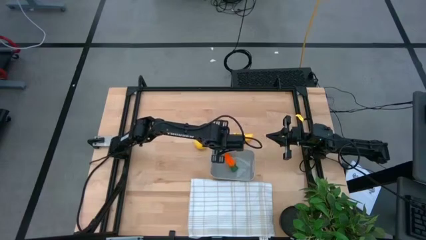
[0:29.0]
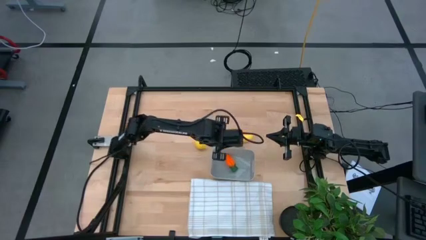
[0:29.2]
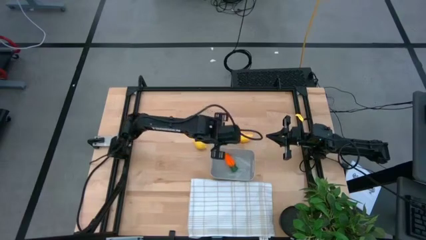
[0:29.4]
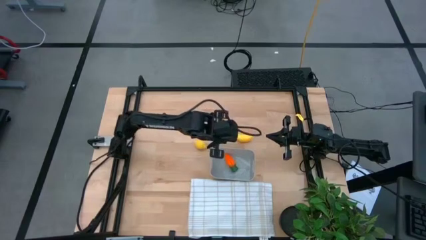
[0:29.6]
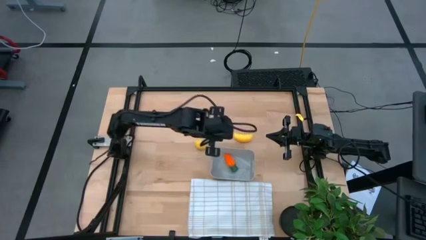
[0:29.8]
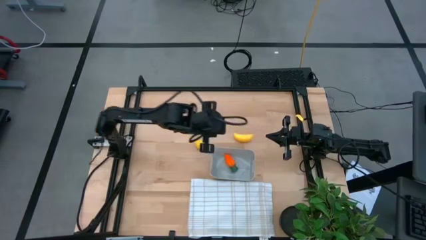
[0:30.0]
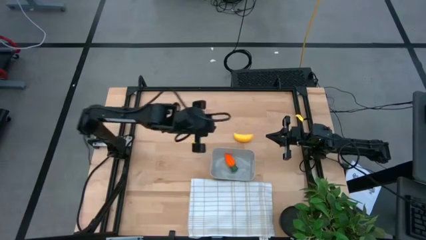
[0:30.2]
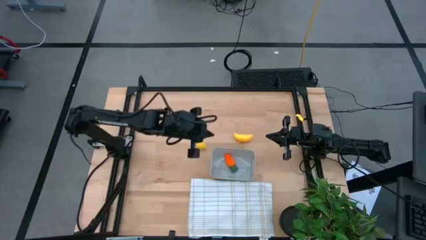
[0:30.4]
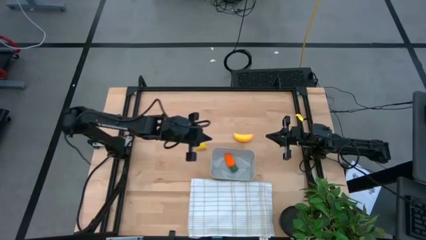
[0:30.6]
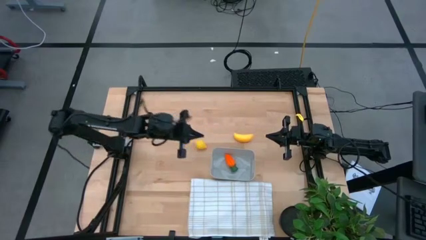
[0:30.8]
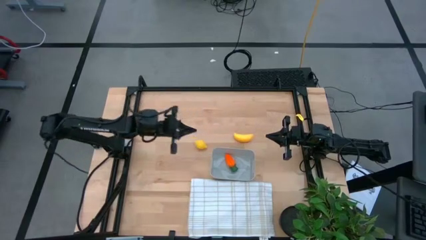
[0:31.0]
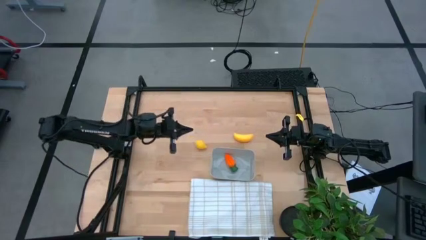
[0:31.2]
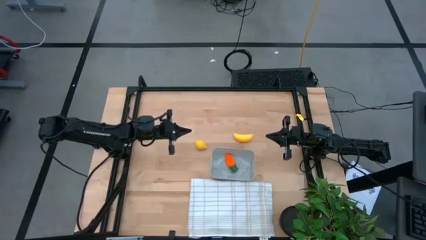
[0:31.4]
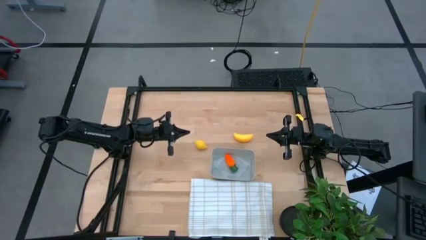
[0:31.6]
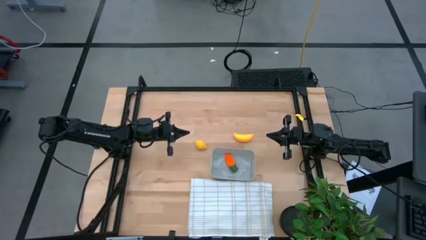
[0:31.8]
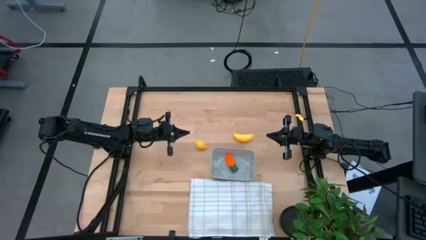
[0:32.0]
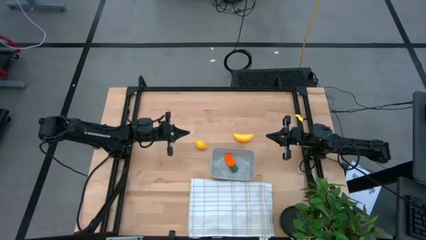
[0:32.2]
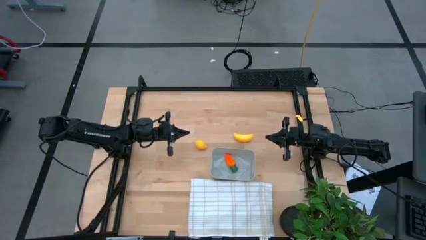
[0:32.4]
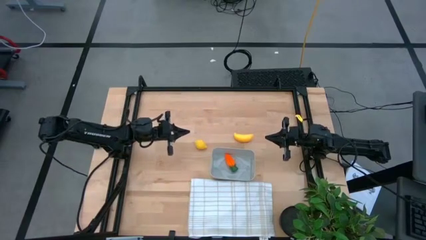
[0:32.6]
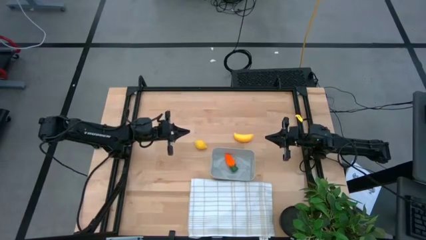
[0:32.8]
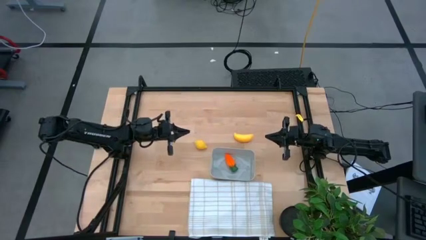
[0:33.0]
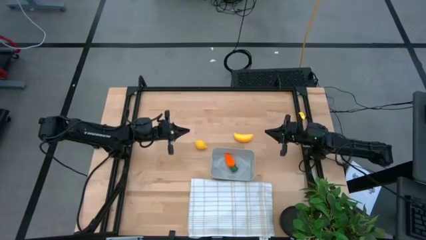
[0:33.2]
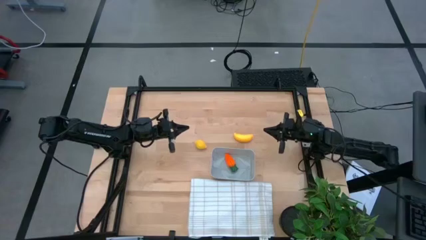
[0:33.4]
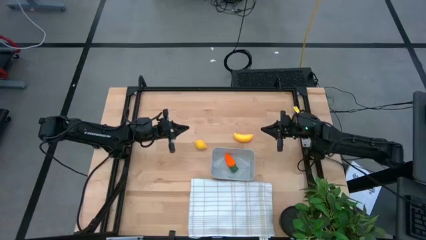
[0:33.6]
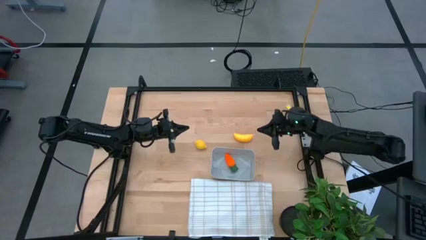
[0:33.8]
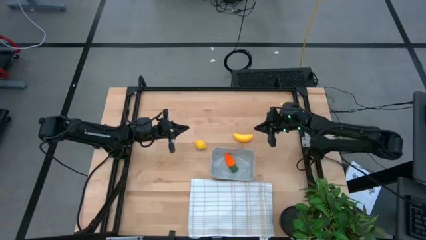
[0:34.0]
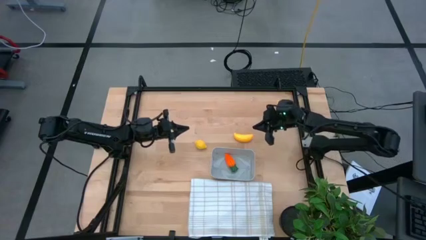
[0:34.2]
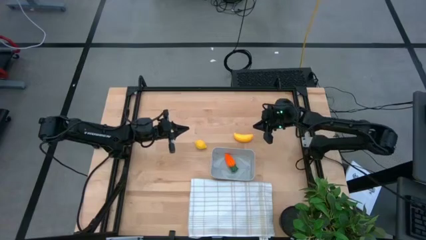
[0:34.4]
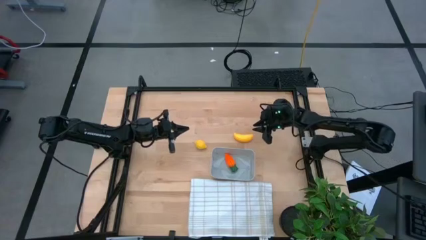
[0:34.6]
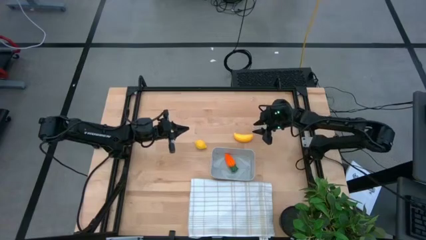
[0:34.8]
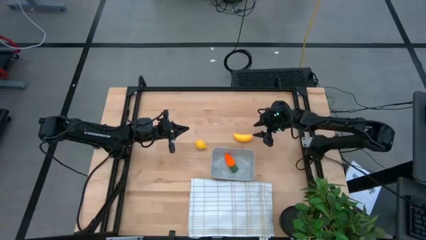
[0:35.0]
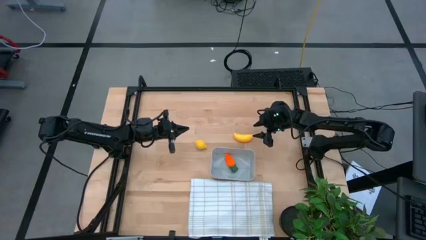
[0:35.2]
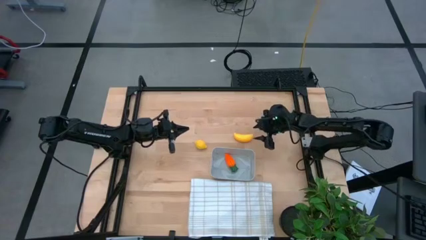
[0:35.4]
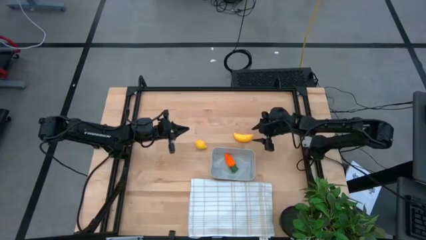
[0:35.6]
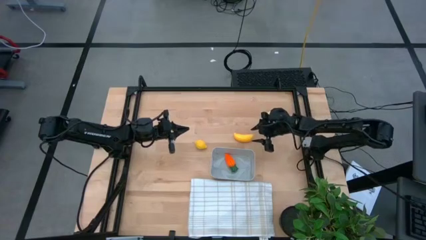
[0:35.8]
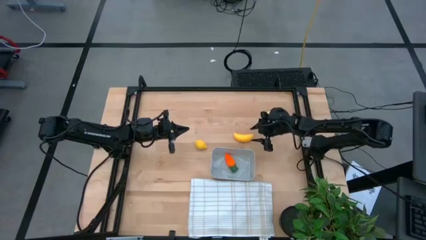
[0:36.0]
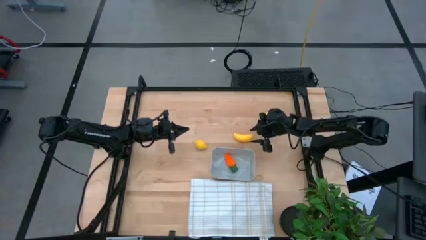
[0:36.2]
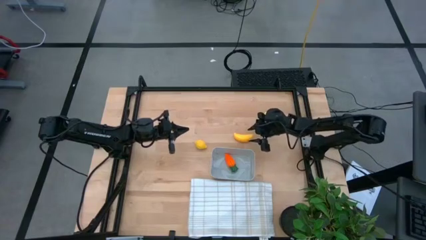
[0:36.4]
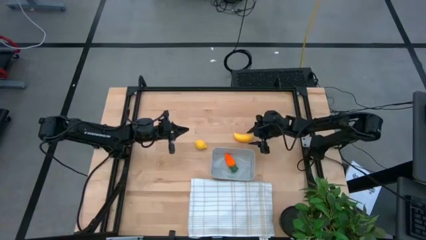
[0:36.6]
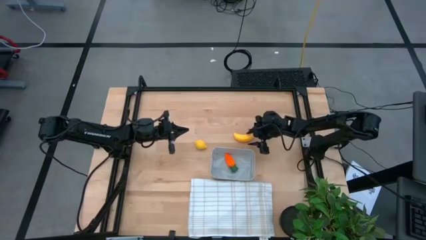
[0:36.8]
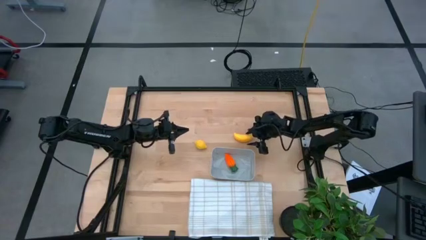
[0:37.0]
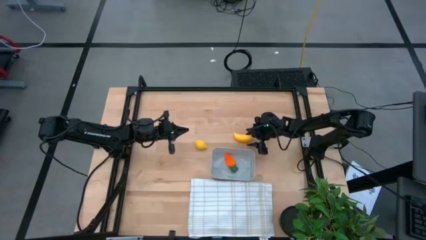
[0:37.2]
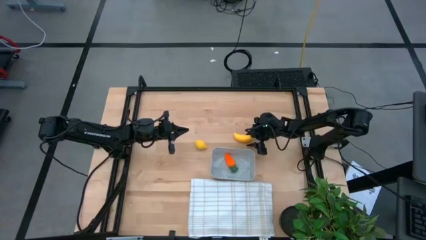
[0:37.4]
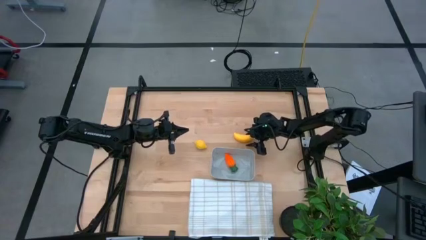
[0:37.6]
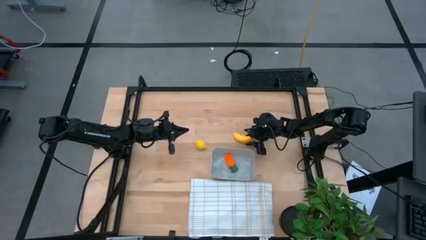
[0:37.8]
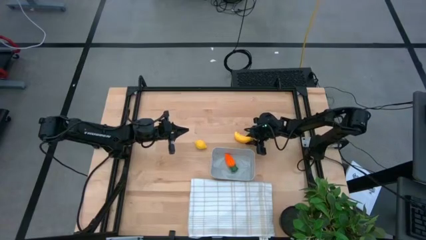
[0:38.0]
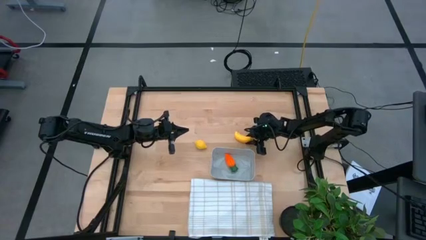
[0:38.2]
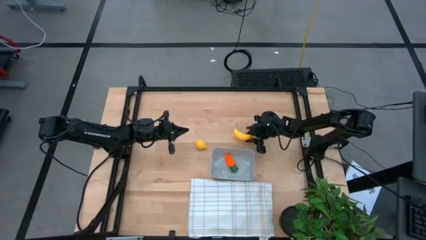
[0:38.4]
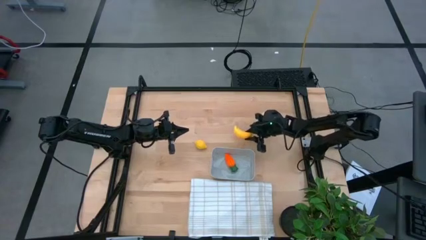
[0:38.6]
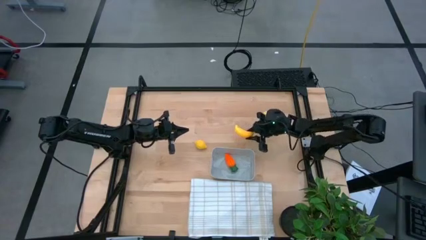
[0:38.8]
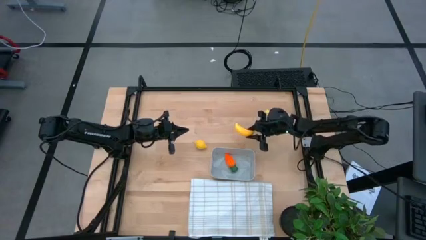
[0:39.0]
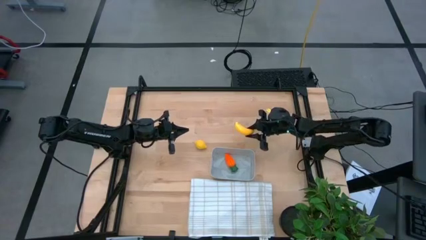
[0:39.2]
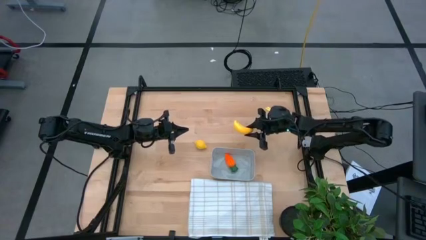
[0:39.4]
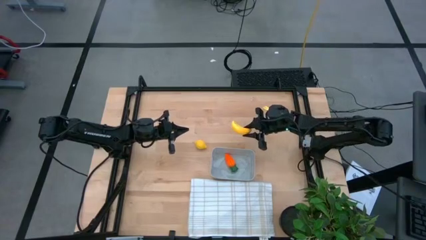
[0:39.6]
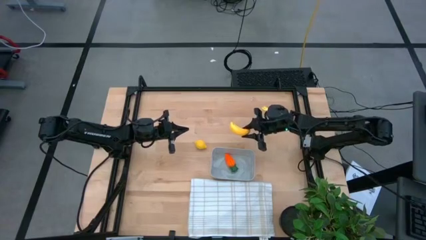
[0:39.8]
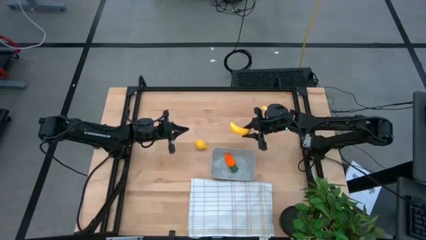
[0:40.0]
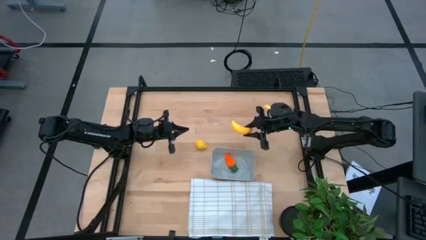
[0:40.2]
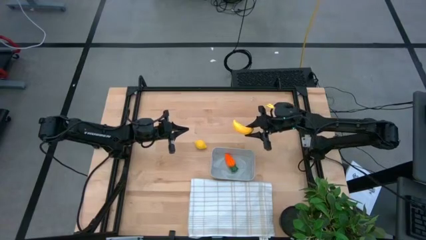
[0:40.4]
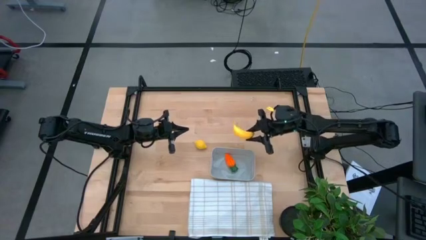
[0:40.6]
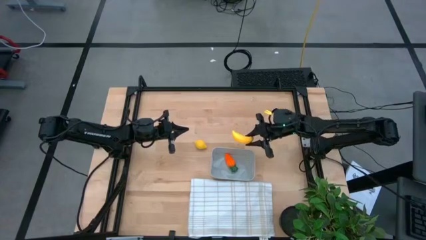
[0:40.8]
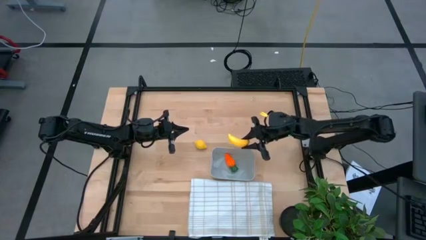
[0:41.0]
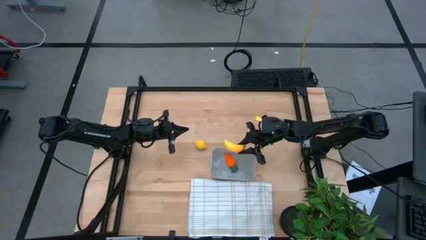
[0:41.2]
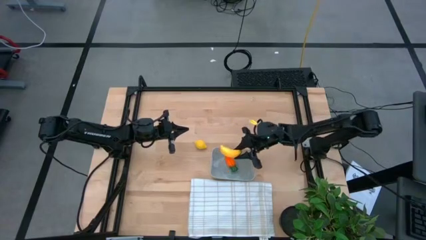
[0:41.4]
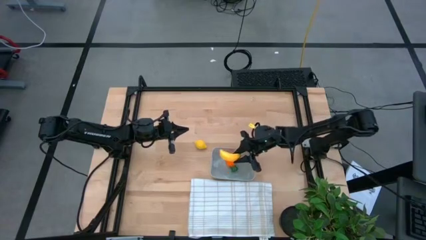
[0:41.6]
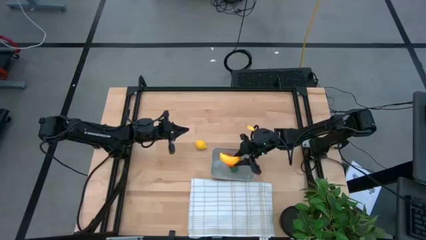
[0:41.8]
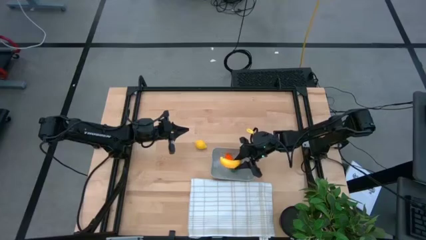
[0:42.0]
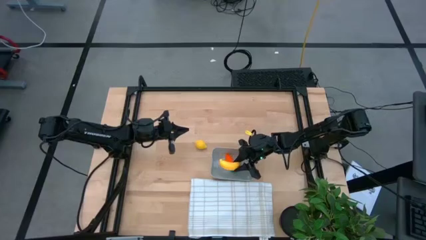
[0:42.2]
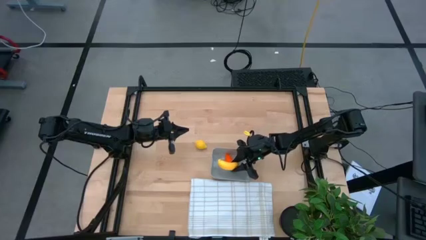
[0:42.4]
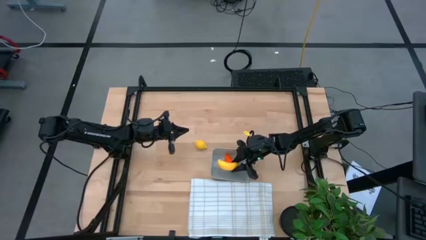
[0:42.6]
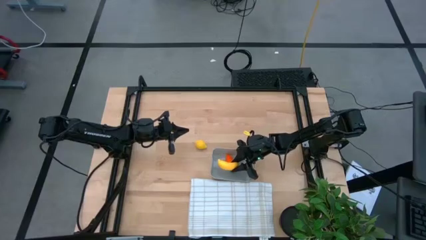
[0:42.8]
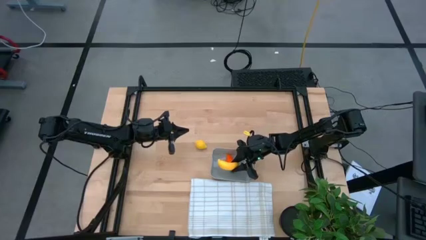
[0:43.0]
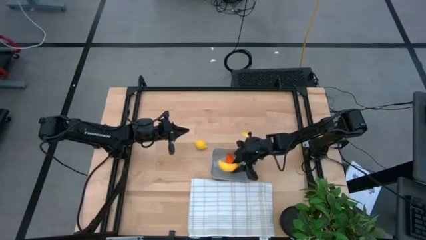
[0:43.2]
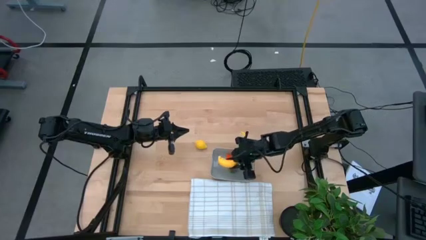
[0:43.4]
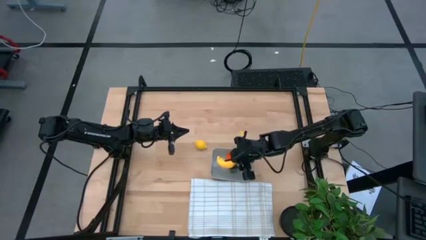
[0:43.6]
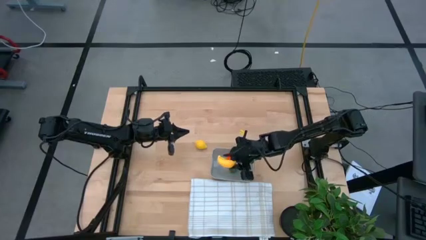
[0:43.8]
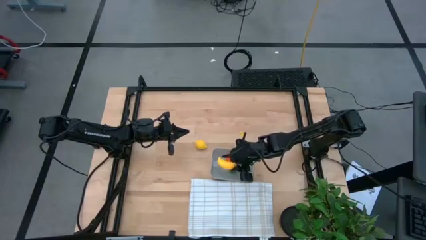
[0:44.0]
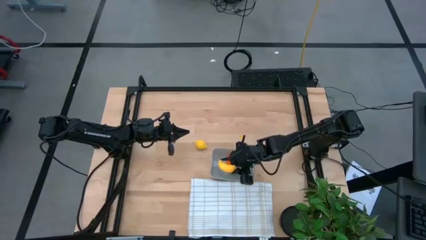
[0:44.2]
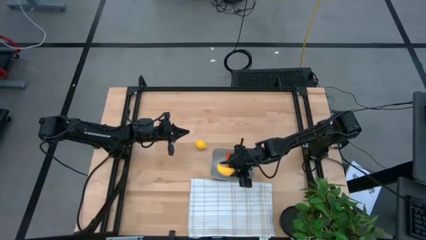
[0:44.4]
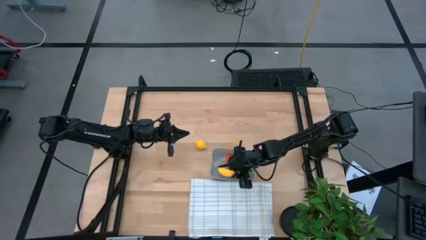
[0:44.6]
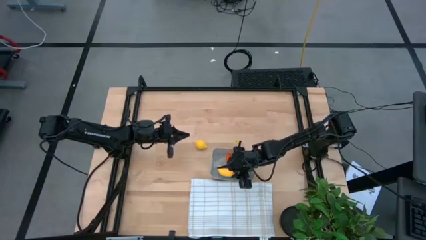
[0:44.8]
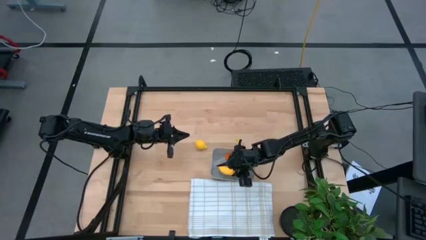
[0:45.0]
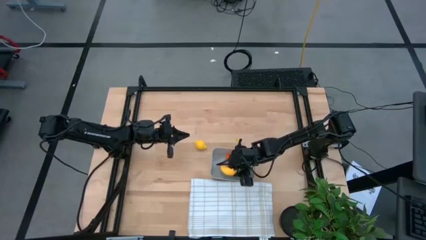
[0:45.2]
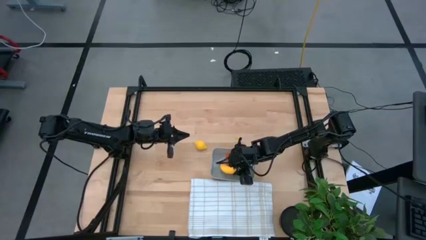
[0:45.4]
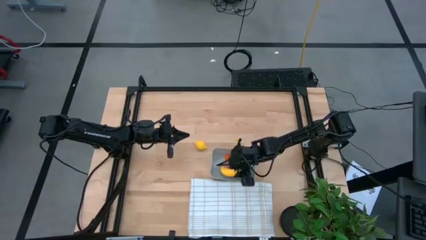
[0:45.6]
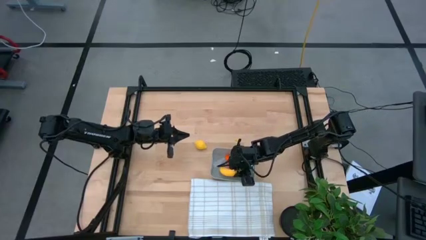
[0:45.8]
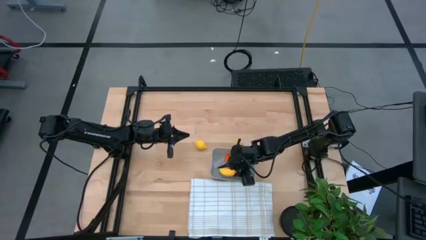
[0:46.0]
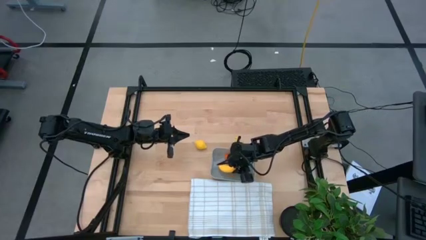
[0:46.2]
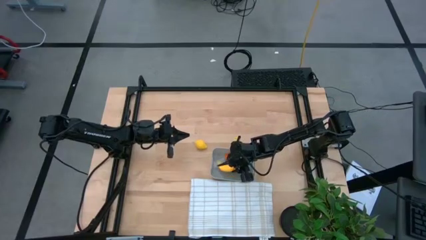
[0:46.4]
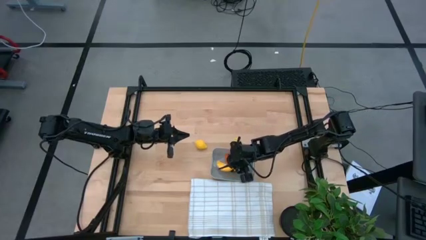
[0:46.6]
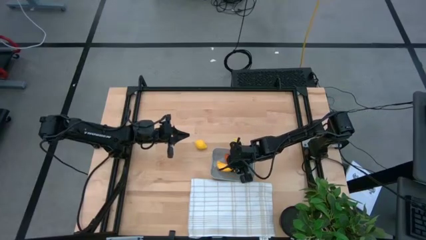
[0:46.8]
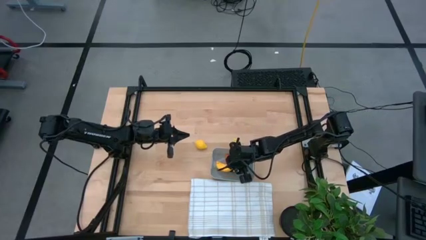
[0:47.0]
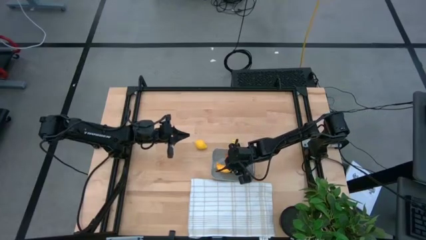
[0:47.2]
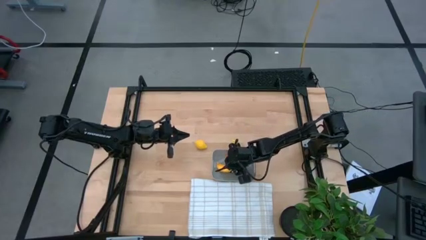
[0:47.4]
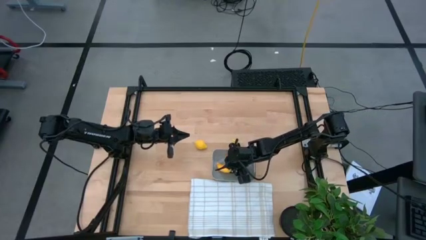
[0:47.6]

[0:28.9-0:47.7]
Task: Pick and placing Produce into tupperware
Put the banana into the gray bin
